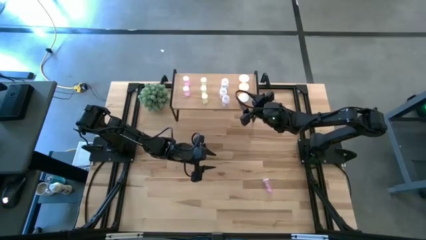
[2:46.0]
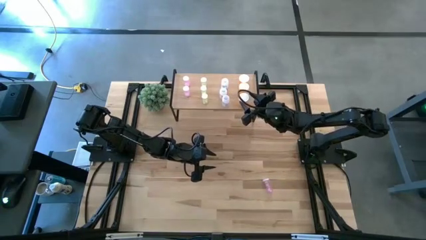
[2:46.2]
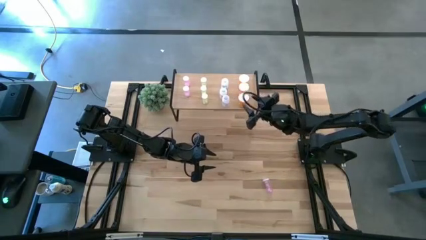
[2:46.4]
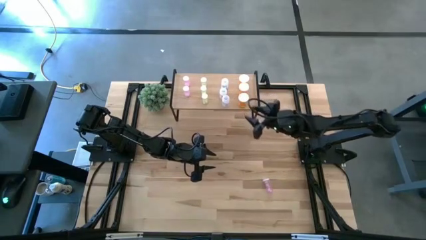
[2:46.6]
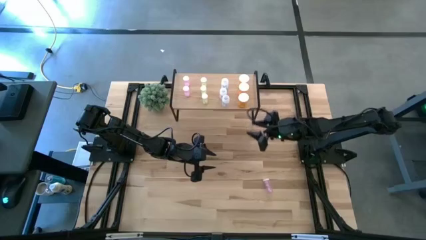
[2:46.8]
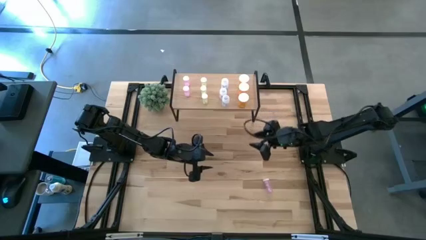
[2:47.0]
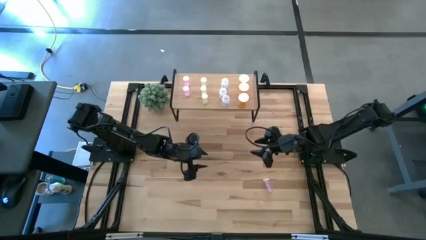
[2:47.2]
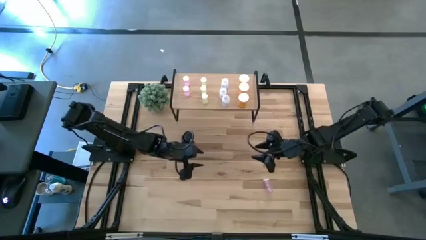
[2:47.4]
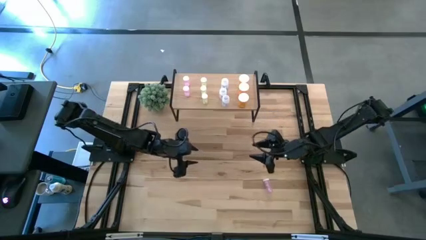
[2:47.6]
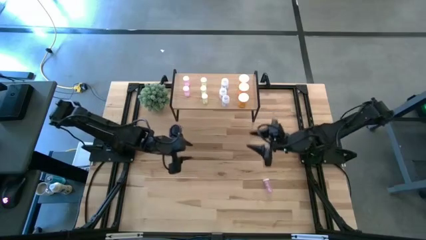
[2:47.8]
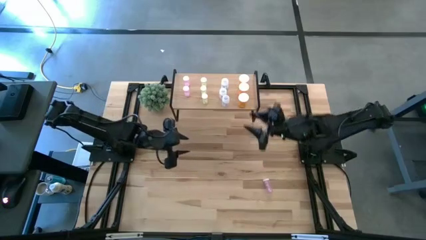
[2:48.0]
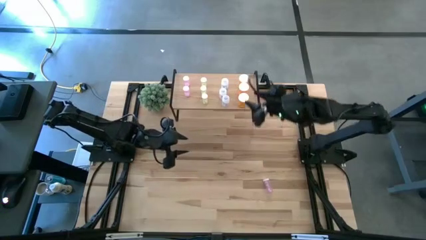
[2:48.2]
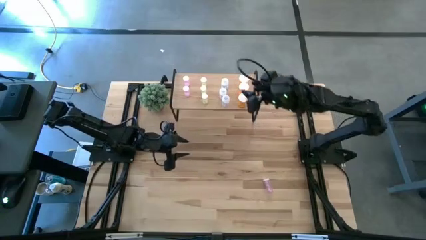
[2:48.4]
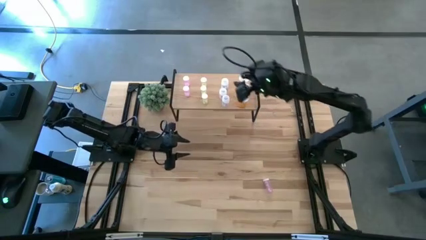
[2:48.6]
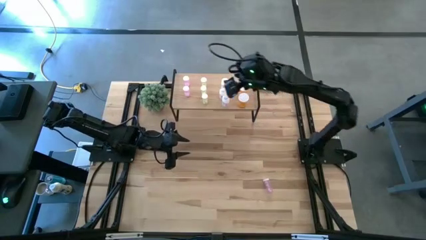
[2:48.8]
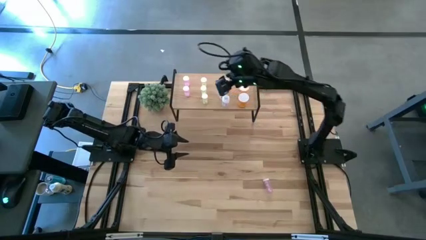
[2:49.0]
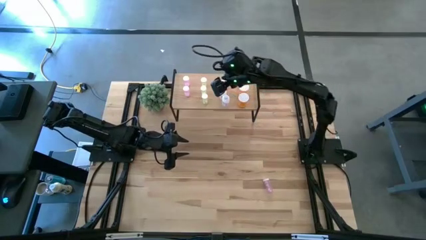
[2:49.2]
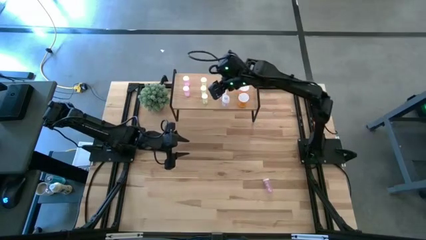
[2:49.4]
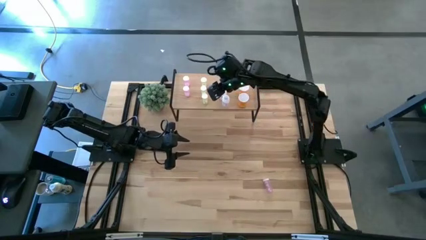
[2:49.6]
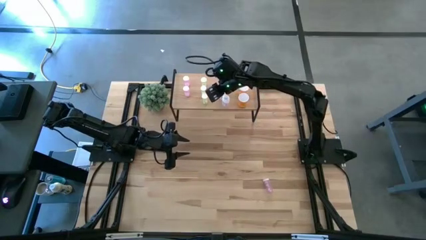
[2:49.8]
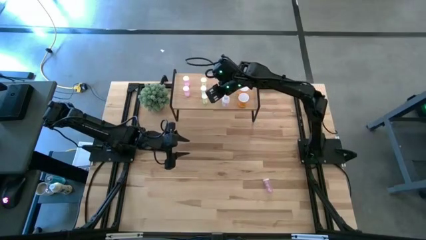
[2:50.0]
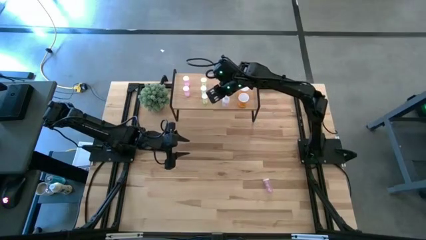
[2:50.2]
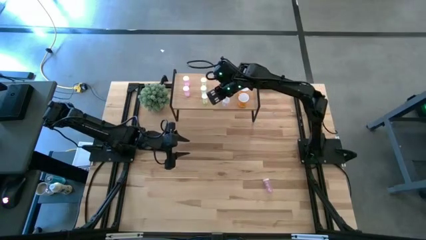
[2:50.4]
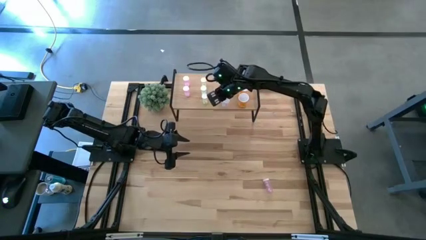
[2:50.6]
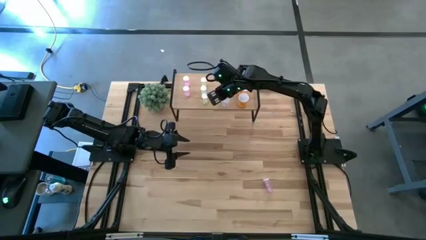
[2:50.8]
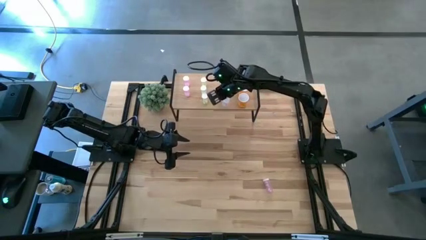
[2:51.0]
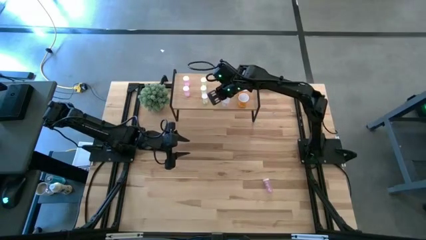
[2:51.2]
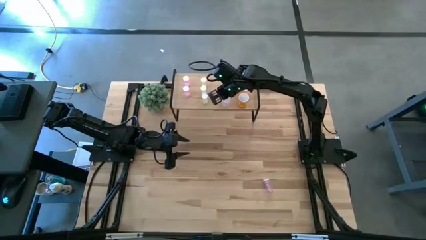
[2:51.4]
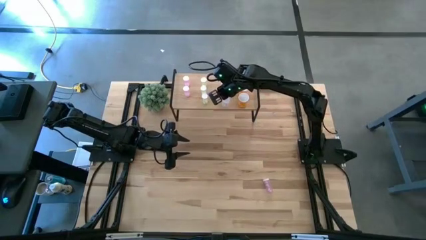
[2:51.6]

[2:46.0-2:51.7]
Task: Pick and place medicine bottles onto shelf by color
Adjust the transparent bottle on the shelf

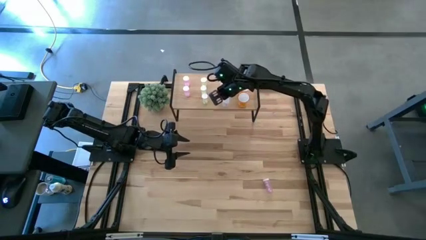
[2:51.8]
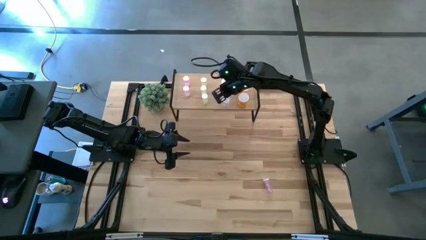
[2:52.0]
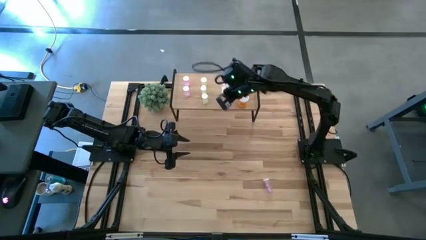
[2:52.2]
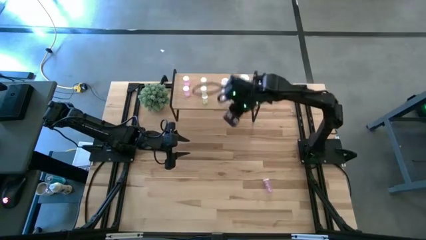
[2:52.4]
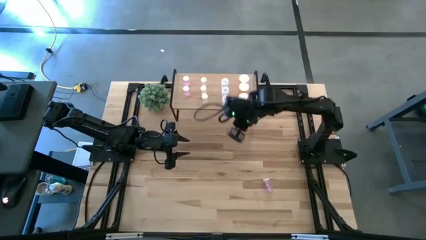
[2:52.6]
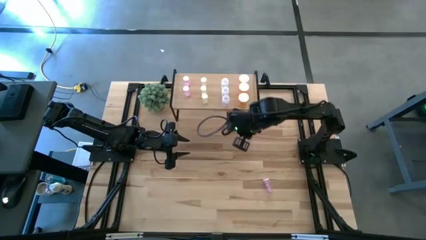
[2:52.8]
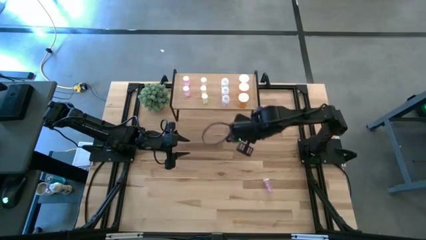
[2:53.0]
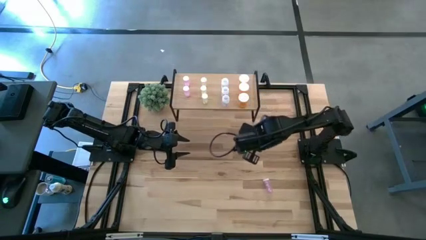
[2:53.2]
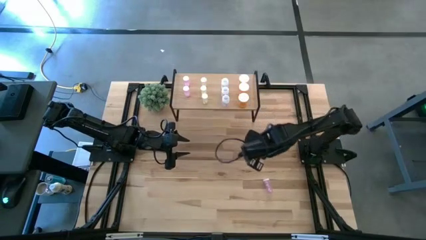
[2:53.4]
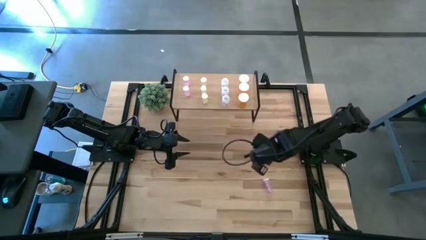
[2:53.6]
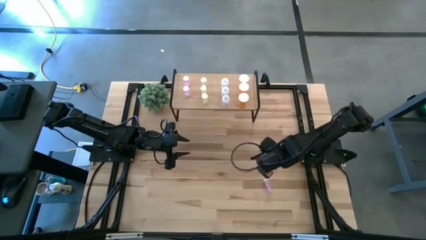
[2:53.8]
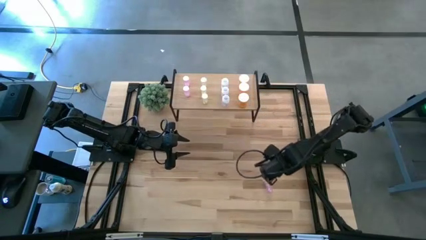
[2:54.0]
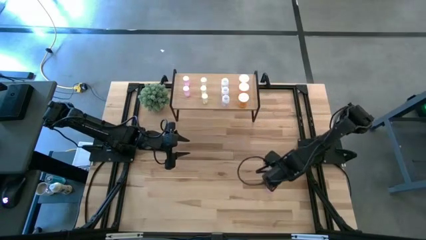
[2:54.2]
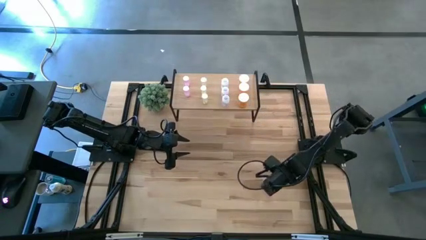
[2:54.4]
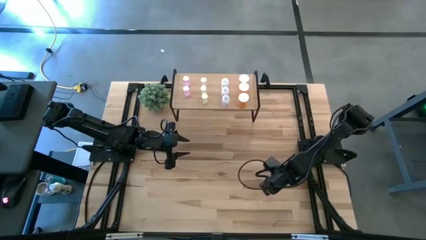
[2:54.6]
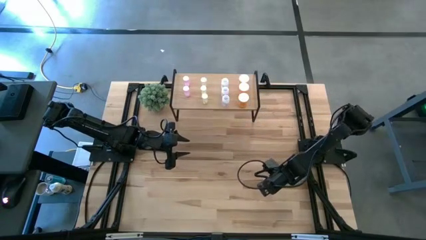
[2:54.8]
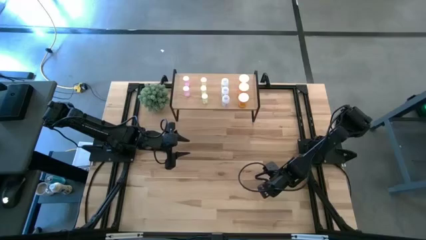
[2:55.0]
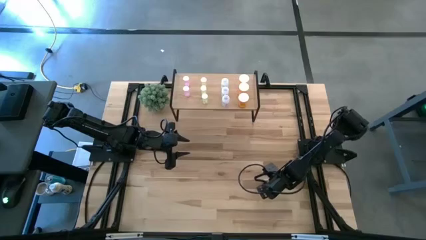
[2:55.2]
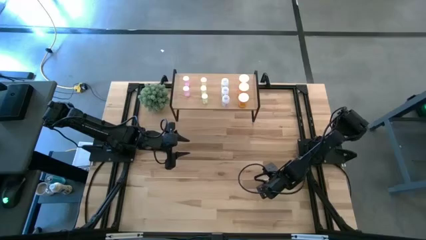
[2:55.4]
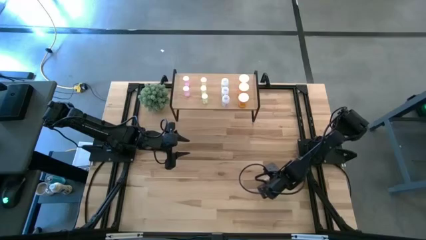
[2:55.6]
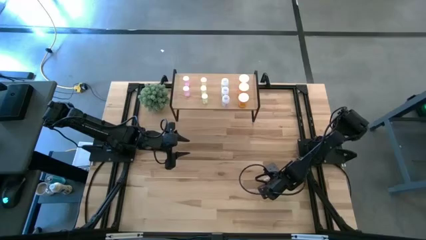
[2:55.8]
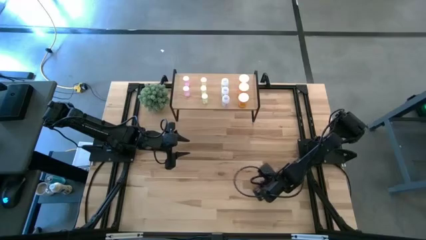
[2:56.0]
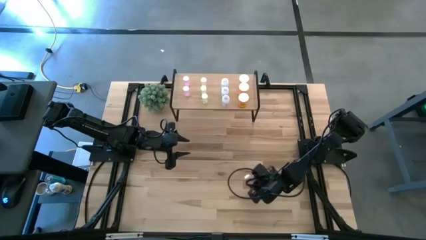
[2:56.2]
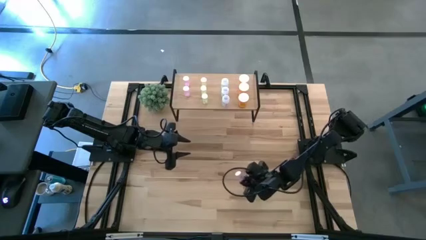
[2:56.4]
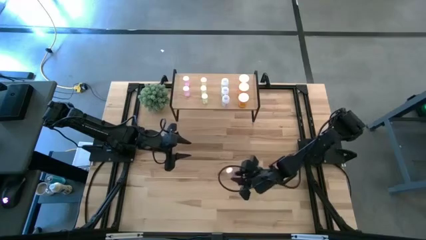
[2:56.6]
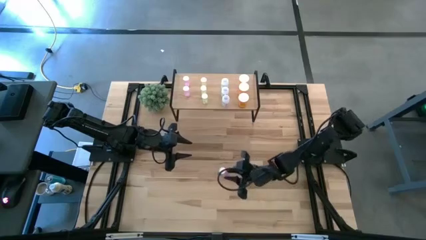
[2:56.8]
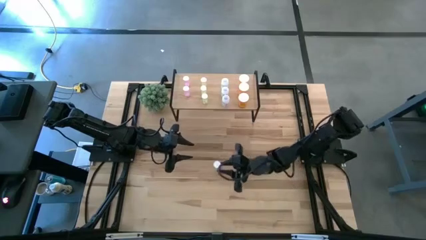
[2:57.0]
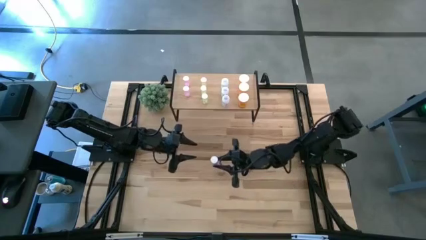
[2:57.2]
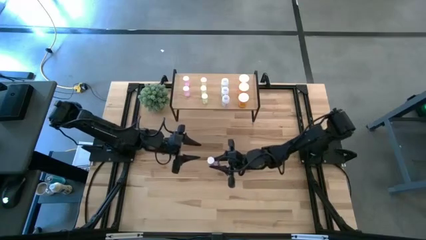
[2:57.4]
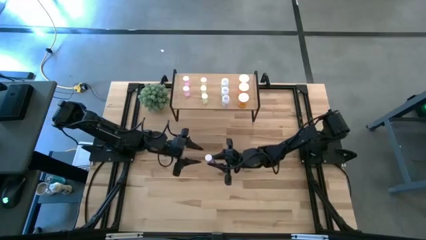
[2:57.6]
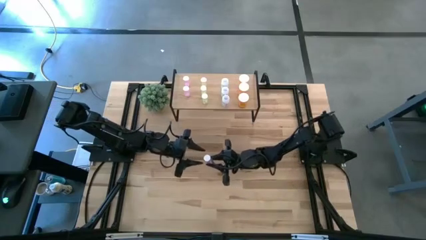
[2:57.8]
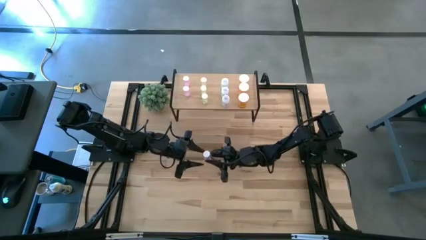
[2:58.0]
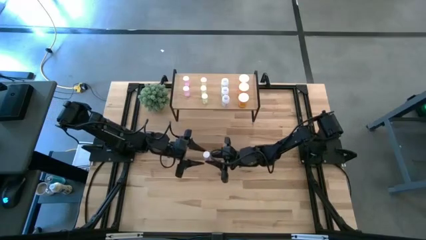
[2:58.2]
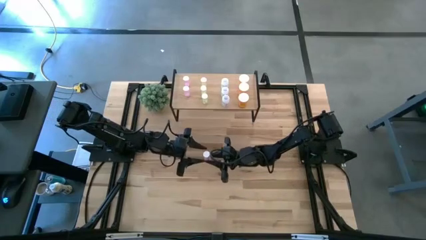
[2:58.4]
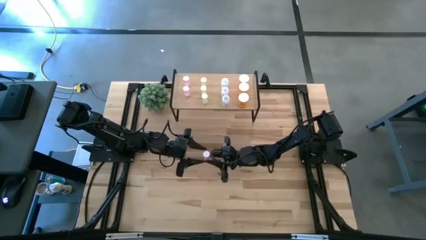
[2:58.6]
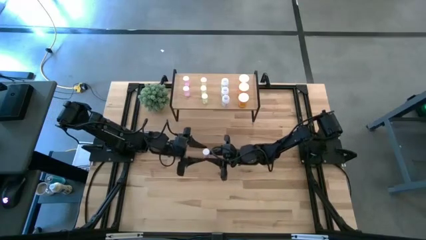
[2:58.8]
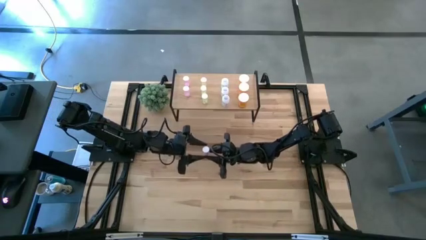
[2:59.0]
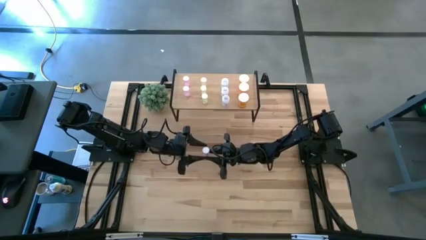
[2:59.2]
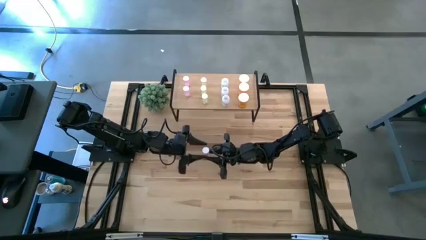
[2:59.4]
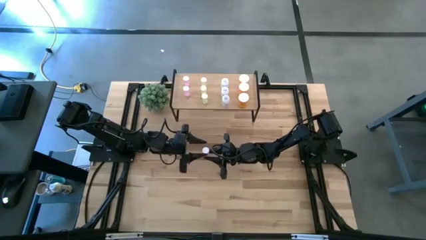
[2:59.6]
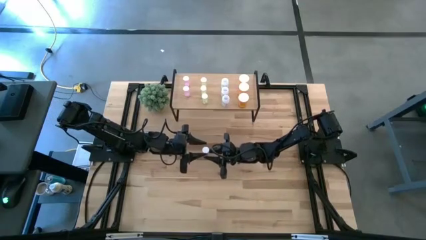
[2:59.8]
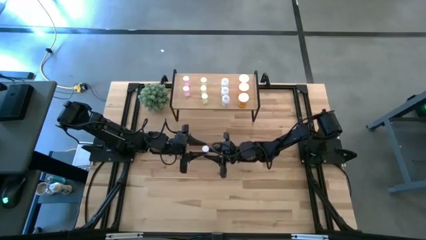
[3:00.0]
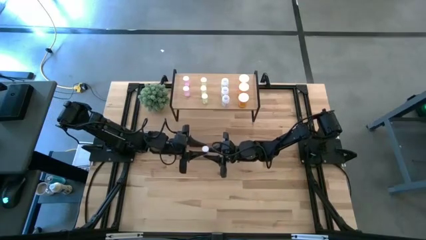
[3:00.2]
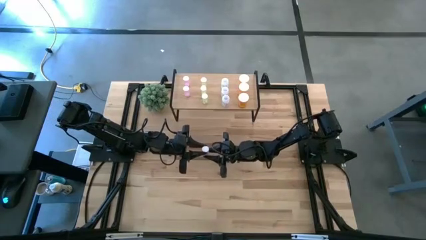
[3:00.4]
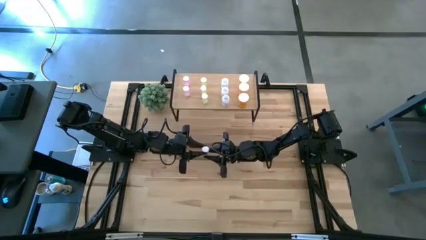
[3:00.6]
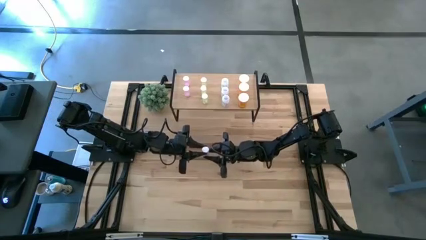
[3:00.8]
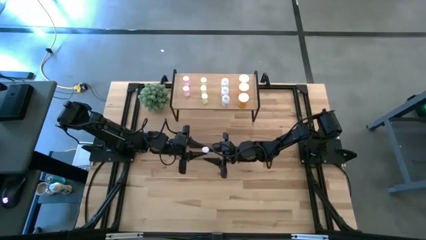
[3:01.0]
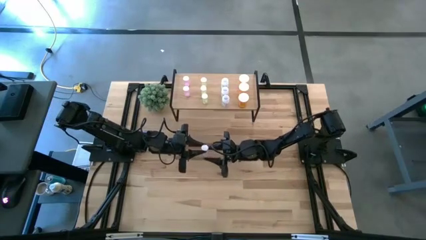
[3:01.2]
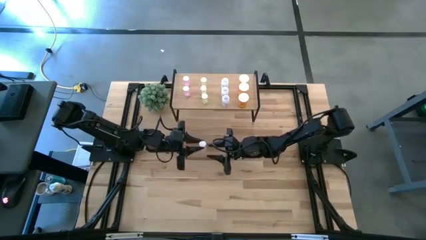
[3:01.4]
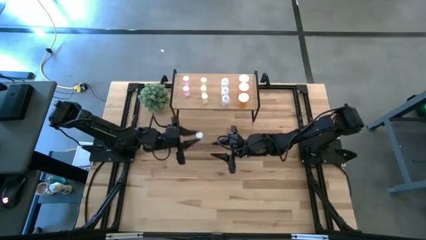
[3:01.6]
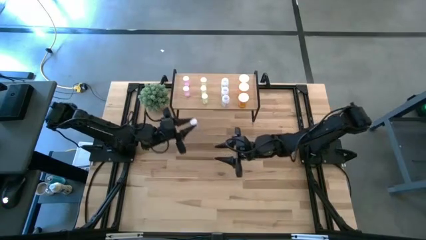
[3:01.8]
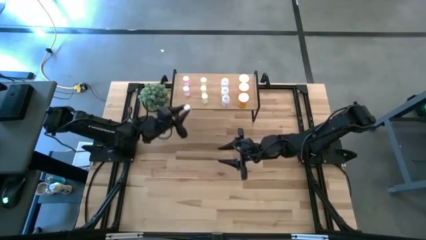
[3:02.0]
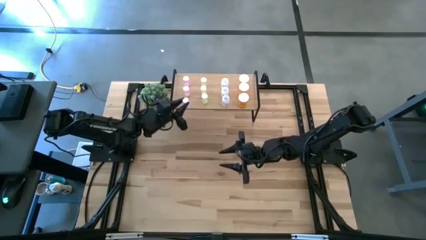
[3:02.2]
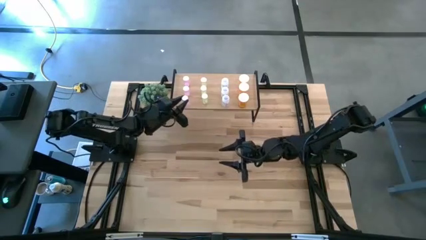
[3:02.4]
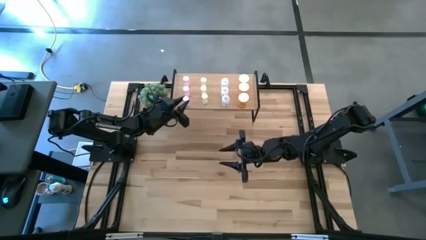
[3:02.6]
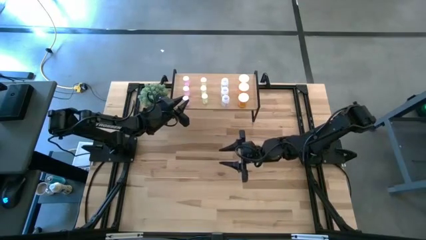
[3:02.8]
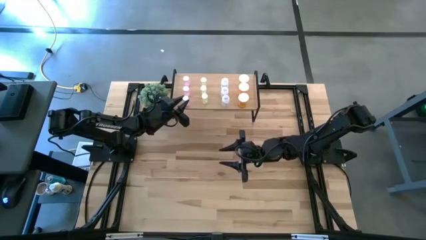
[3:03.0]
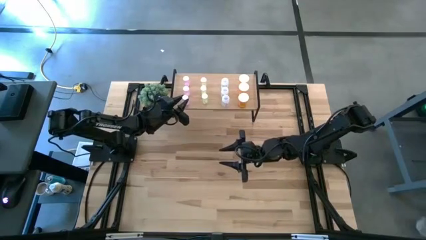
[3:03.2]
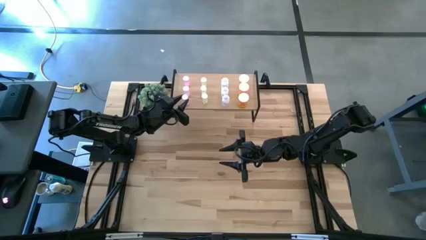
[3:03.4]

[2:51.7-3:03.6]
Put the pink pill bottle aligned with the other pink pill bottles on the shelf
